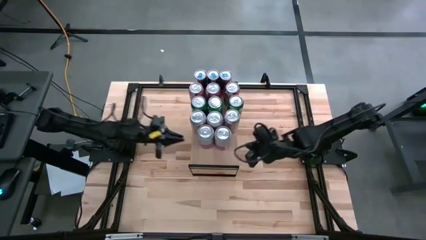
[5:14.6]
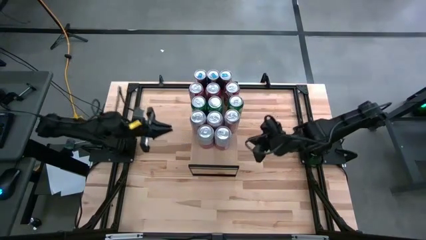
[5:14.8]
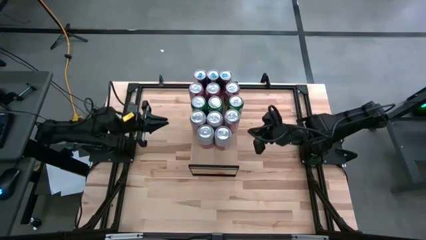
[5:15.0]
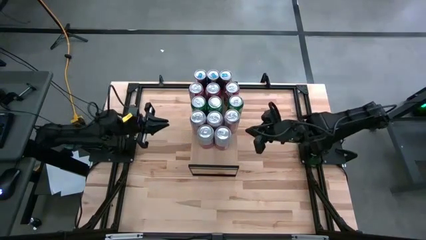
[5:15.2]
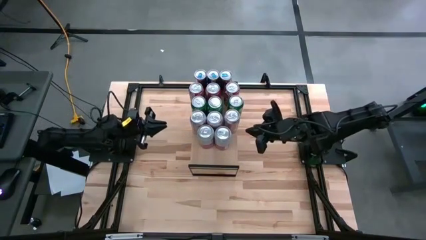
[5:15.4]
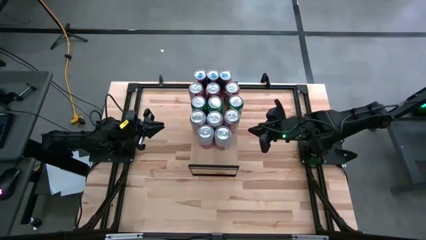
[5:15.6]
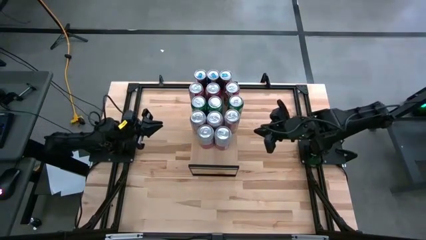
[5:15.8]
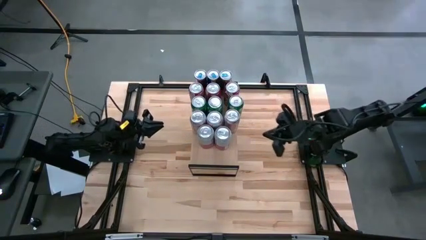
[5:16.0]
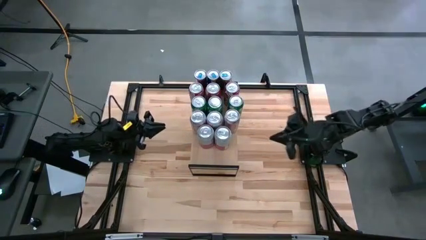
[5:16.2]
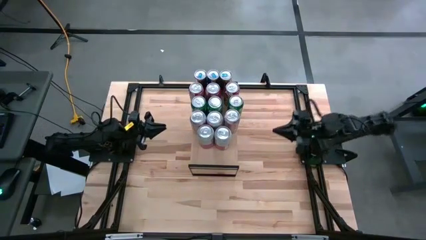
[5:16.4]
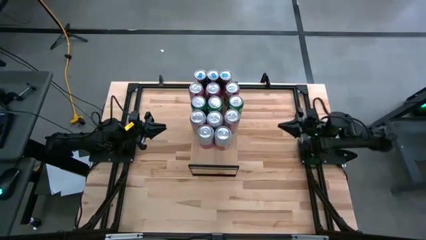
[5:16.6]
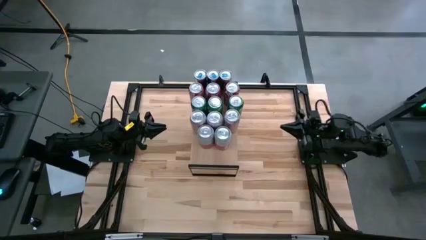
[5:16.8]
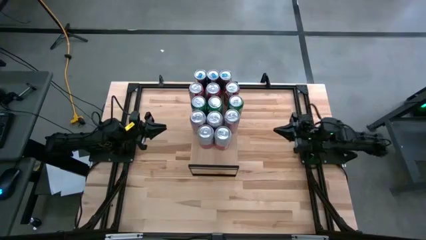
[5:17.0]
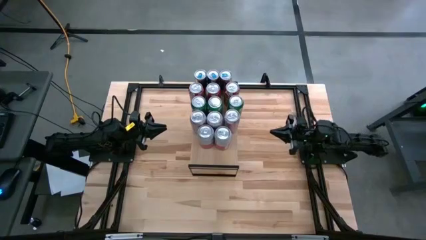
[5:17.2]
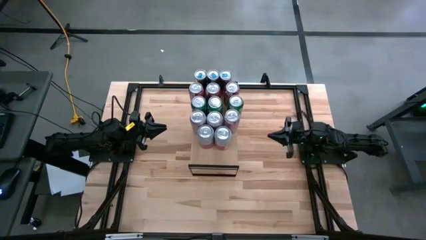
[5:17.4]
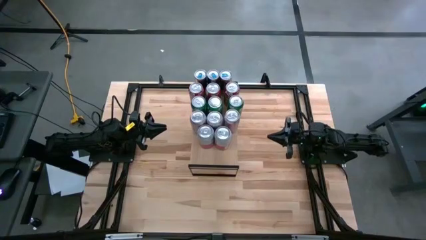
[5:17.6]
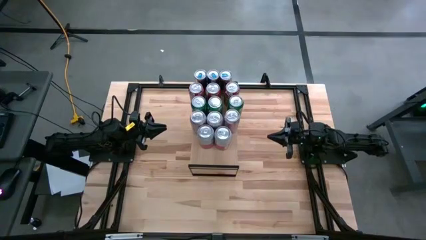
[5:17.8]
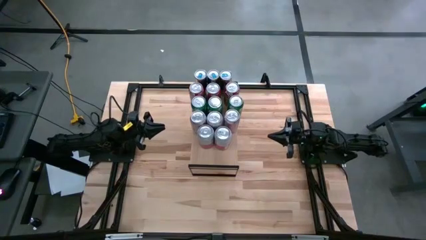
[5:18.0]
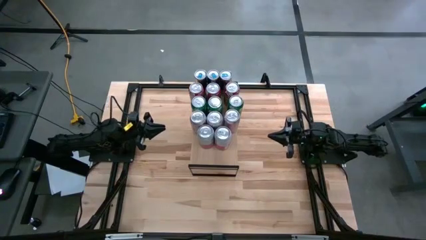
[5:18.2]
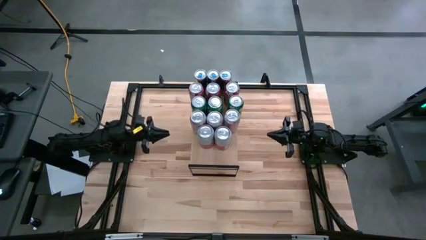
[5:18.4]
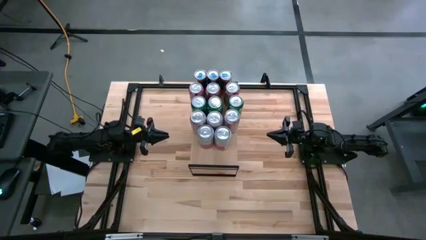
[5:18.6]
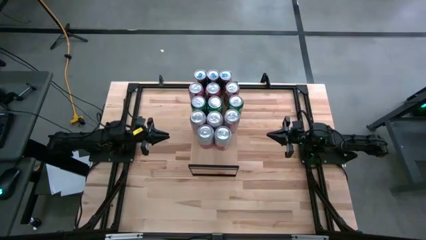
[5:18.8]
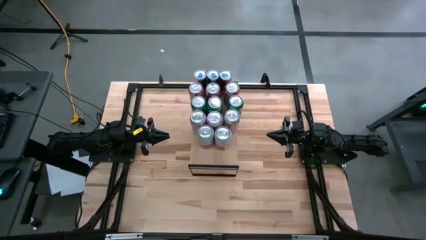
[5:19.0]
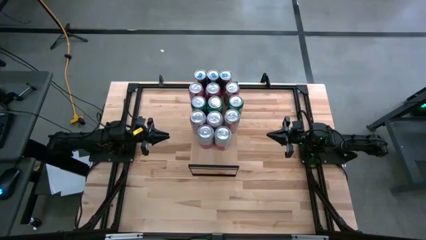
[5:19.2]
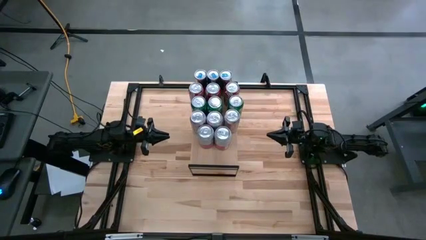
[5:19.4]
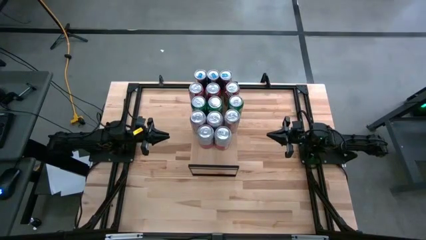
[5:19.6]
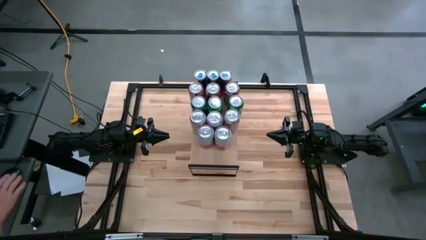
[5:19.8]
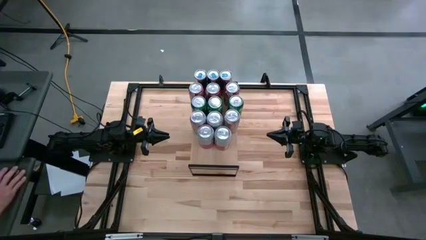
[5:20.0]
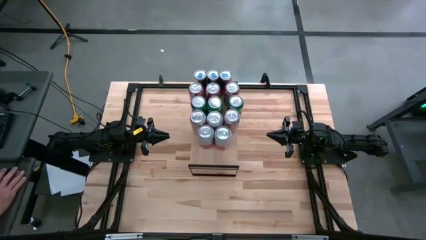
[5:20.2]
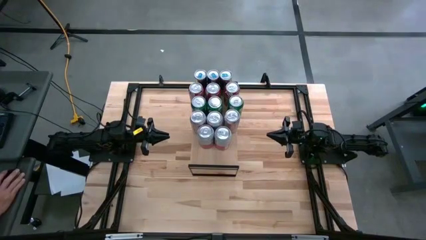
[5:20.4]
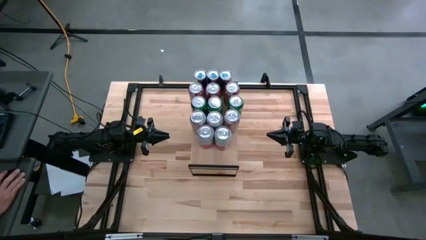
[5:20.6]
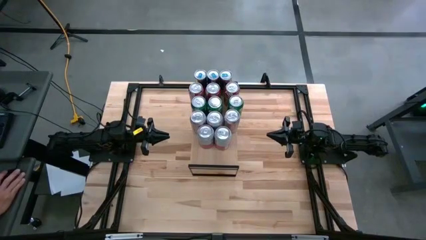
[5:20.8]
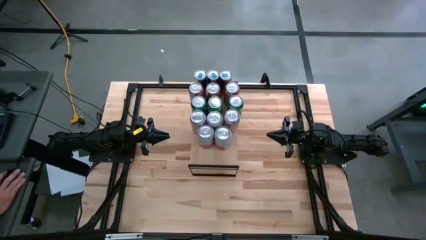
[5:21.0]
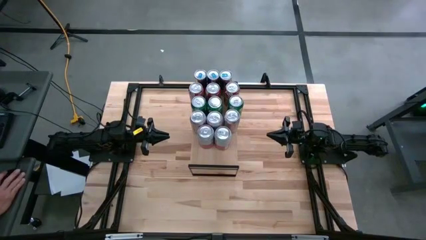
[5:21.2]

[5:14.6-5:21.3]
Task: Place canned beverage on shelf
Return to Home Position

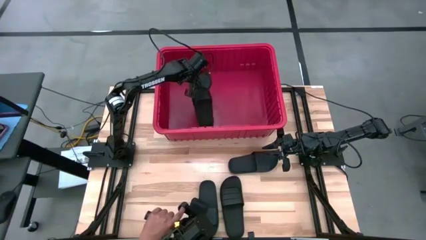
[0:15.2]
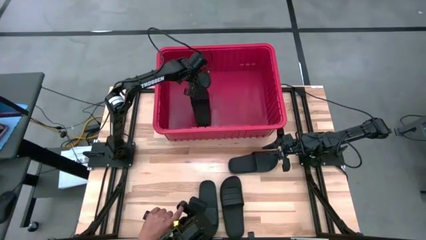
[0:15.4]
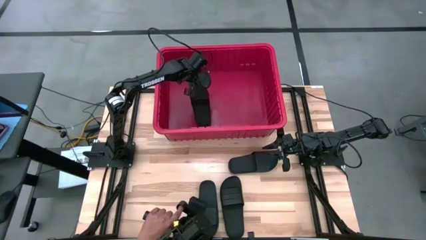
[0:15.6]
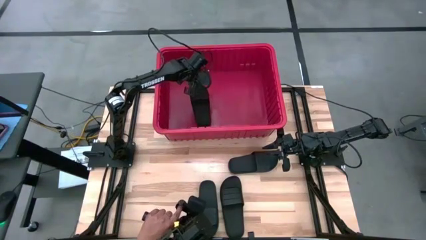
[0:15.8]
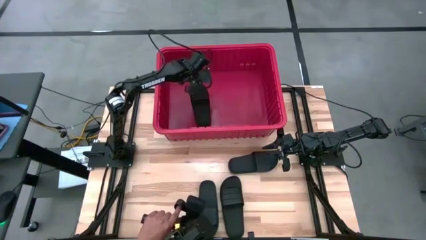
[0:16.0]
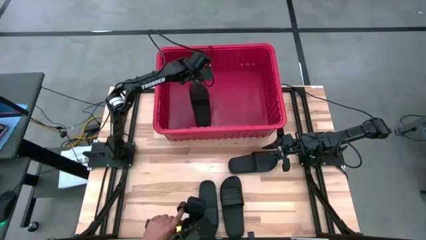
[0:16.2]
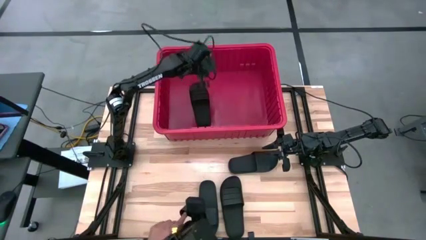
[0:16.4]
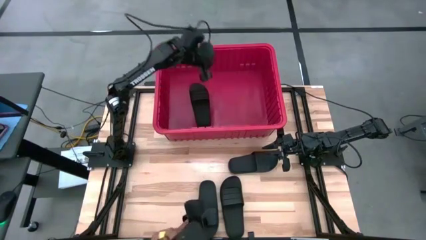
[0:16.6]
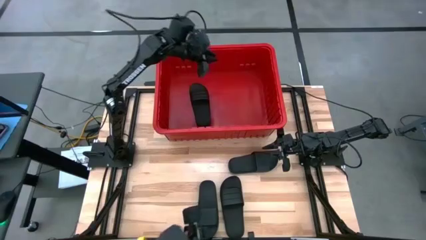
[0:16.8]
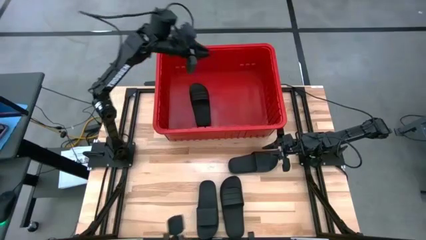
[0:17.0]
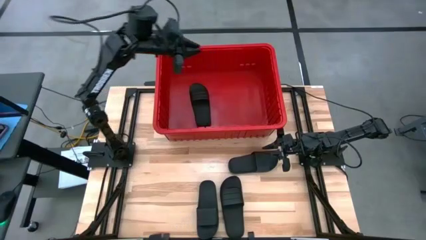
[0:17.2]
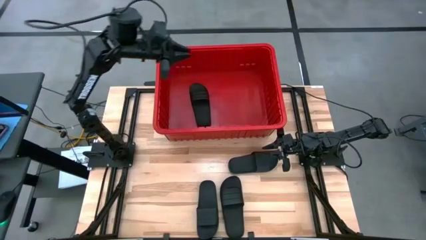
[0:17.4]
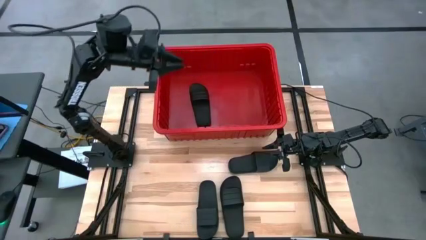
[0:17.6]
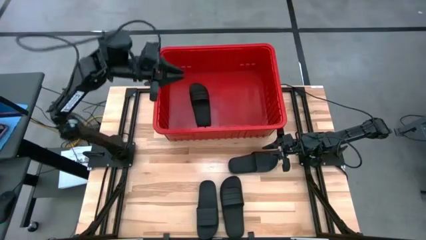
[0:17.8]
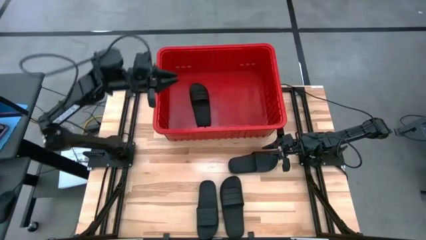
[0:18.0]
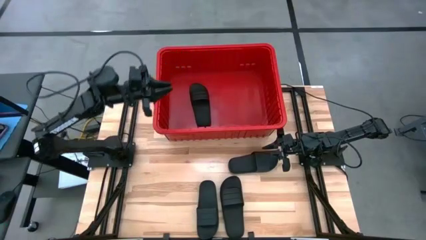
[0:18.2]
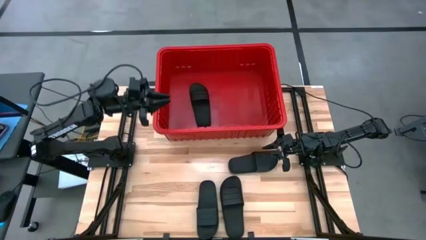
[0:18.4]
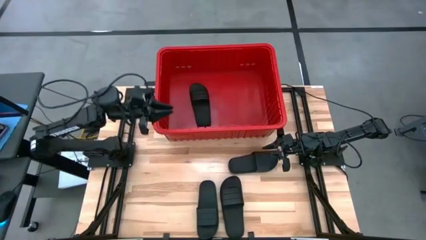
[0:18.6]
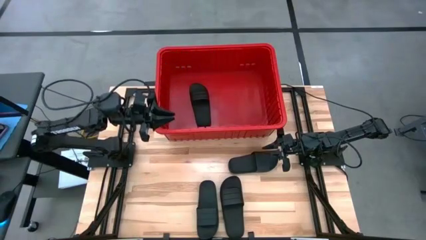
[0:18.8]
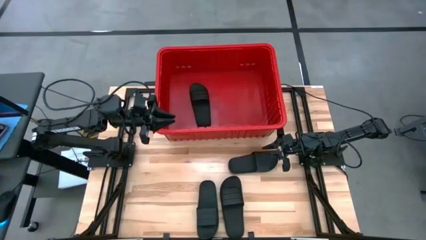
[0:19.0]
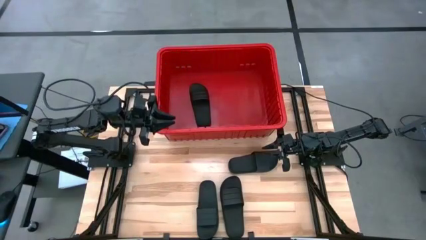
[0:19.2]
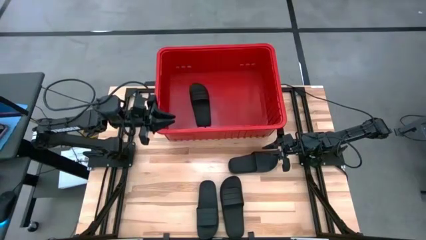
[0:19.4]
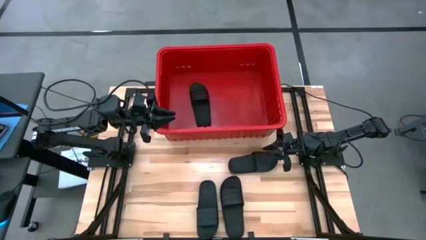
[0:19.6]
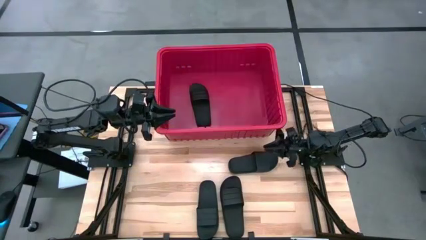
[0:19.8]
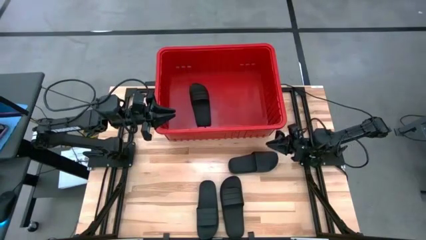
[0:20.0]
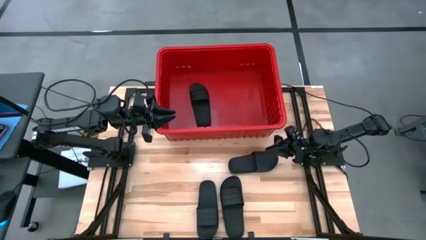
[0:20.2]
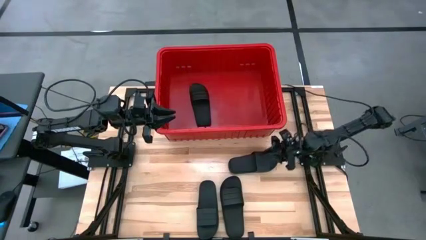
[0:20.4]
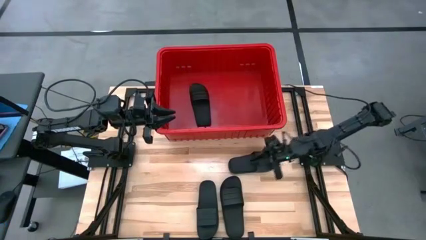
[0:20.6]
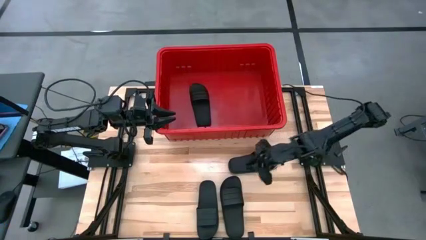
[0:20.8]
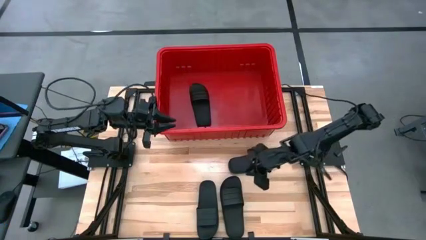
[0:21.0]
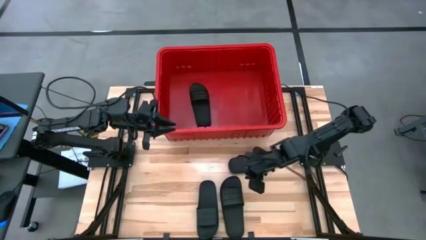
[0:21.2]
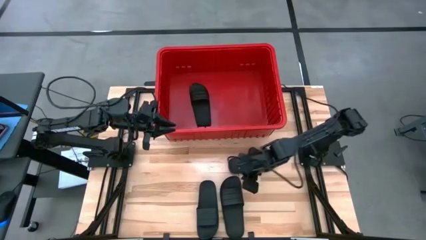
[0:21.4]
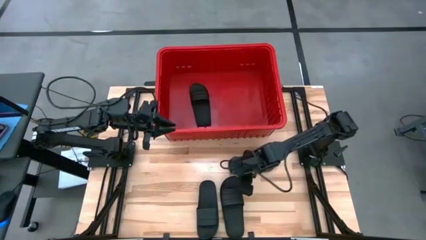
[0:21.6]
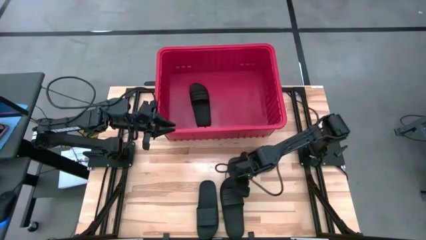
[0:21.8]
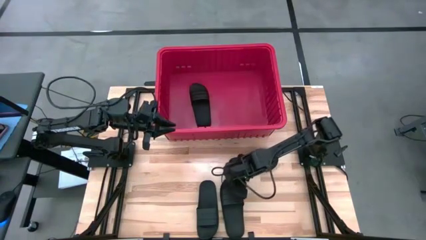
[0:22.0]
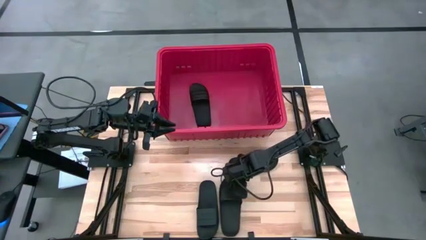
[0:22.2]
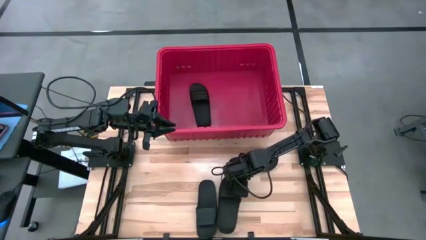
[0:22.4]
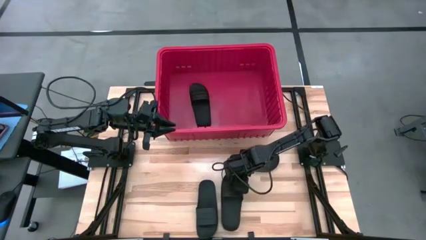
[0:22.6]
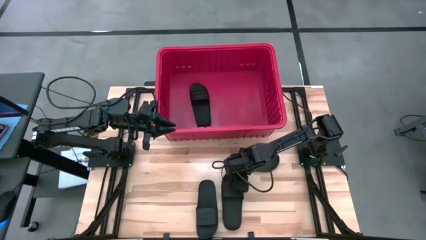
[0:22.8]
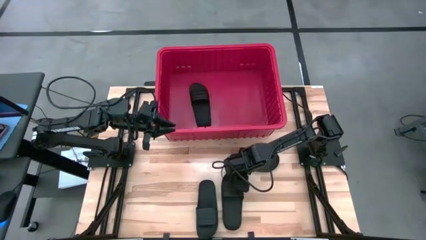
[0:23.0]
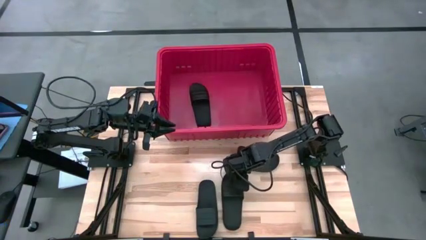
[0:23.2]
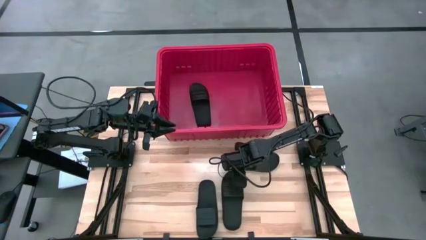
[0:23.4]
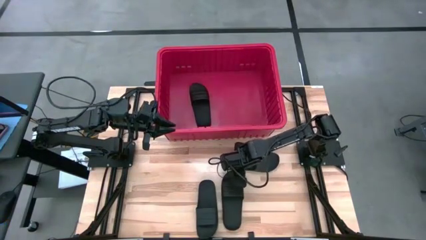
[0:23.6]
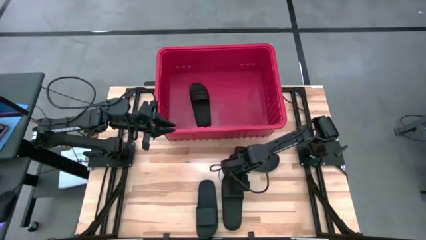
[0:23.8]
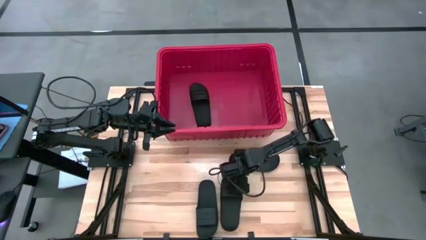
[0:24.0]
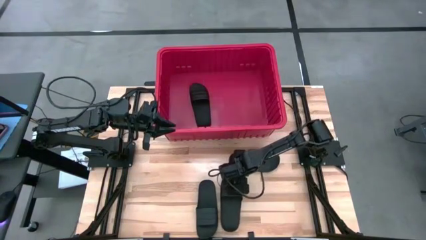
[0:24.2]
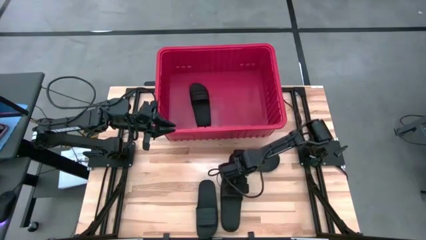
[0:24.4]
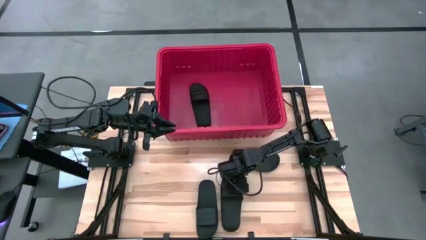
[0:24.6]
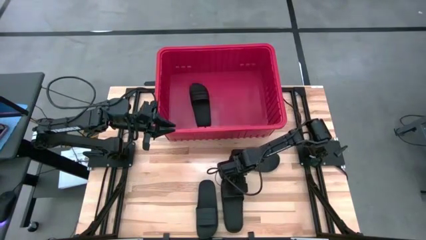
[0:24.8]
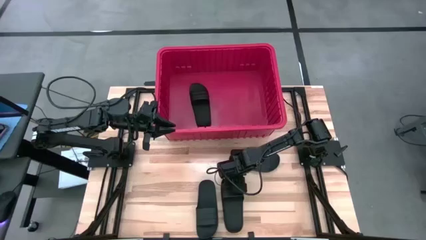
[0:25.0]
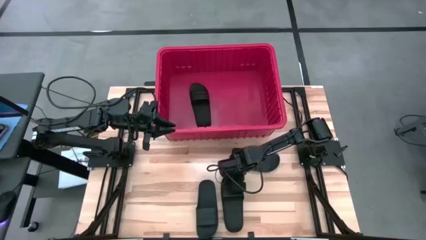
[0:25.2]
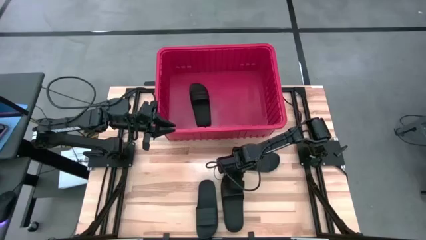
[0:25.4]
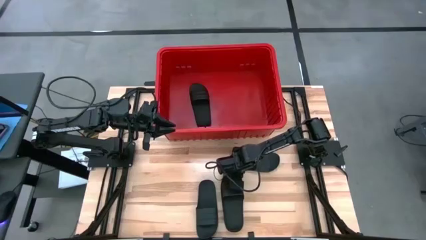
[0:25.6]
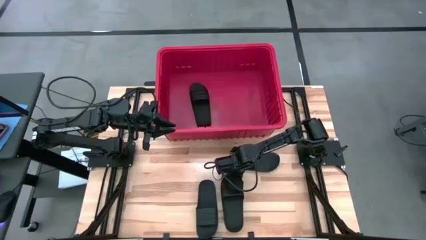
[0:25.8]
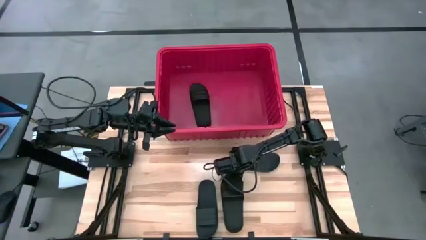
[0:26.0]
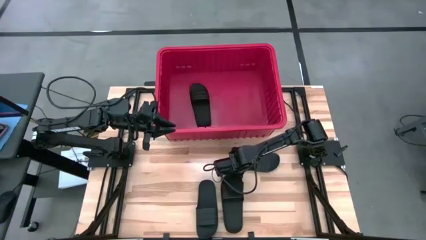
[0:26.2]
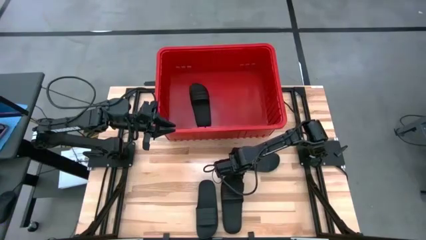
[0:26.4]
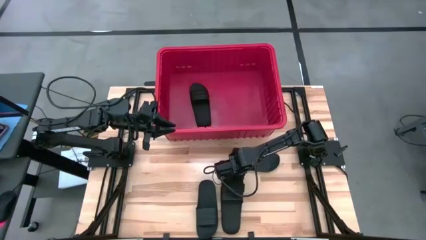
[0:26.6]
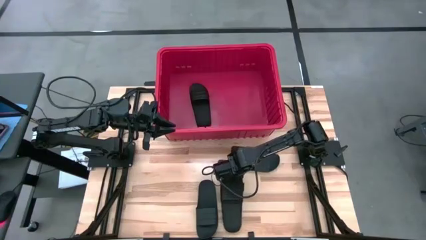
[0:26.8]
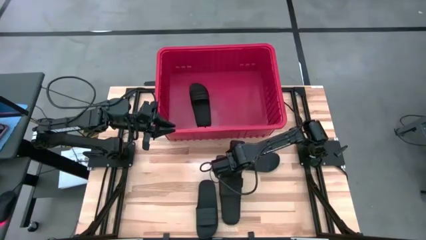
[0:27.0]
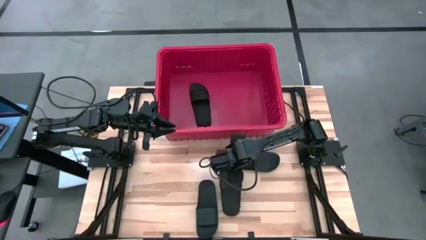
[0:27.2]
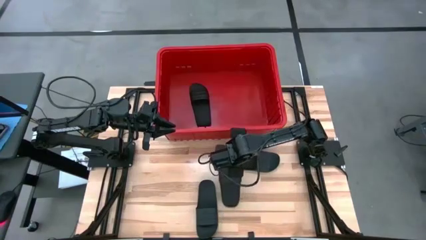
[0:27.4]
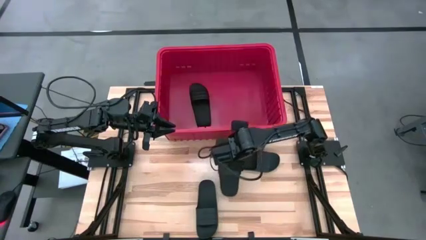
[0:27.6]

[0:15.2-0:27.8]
Task: Pick and place slides into bin
Put the black slide into the red organizer bin
